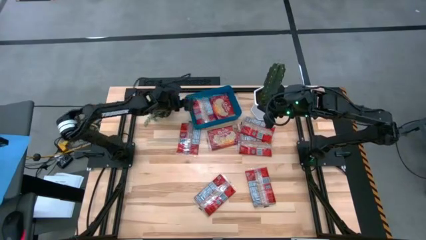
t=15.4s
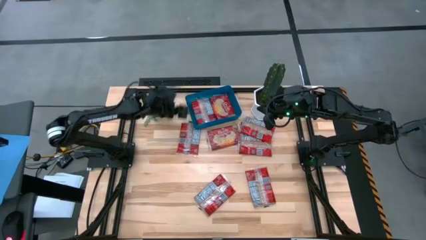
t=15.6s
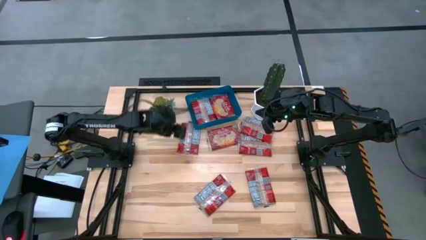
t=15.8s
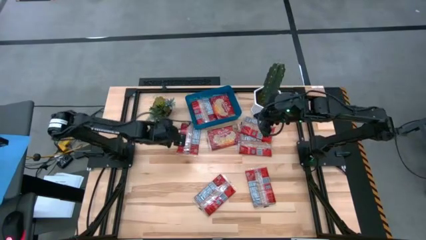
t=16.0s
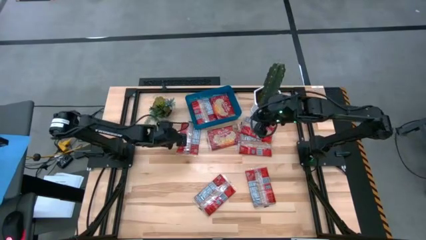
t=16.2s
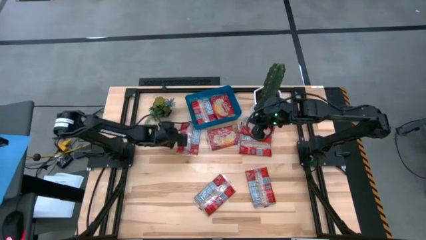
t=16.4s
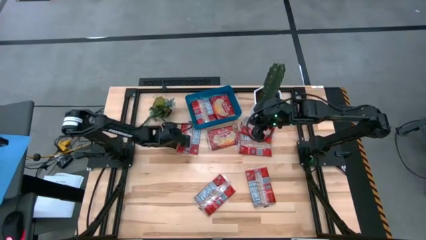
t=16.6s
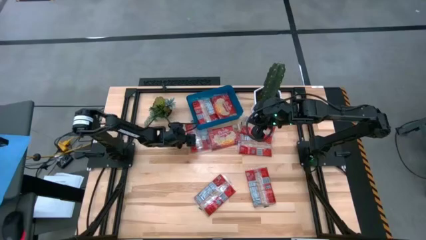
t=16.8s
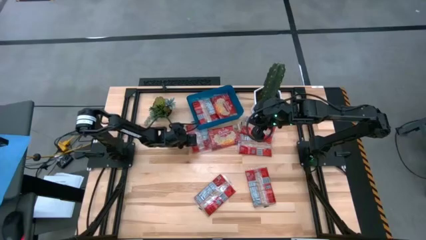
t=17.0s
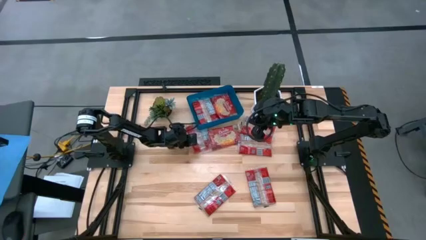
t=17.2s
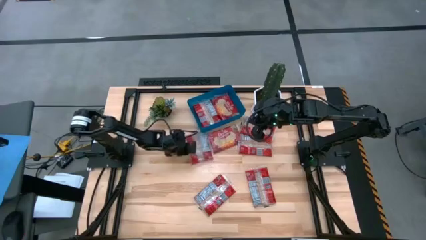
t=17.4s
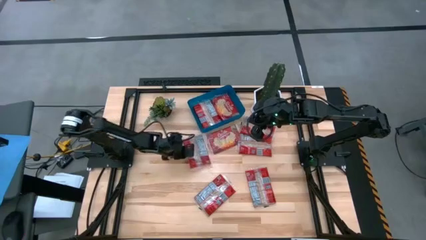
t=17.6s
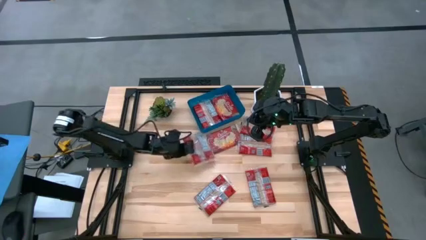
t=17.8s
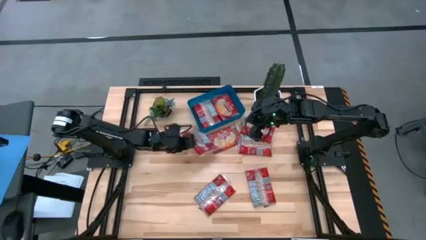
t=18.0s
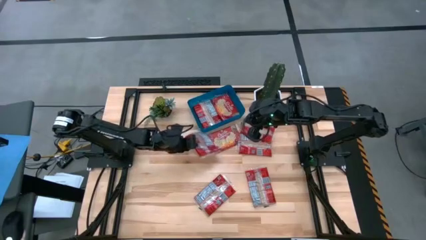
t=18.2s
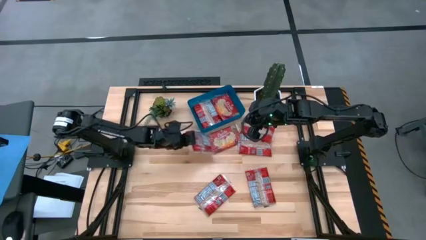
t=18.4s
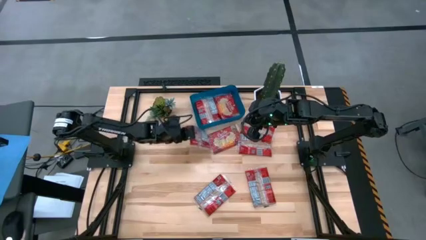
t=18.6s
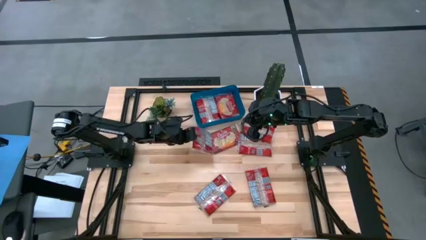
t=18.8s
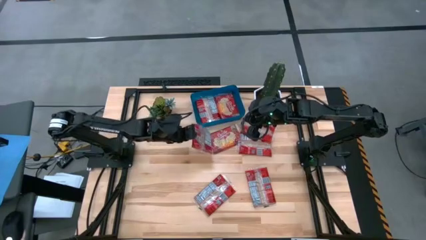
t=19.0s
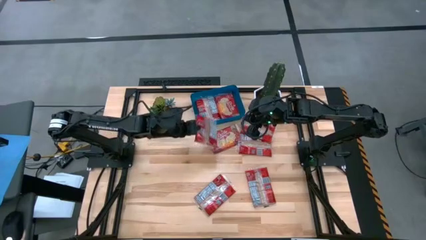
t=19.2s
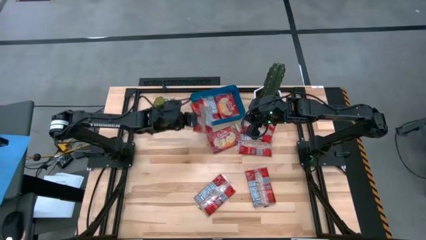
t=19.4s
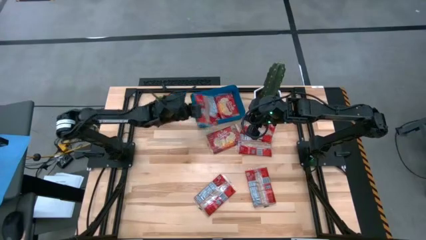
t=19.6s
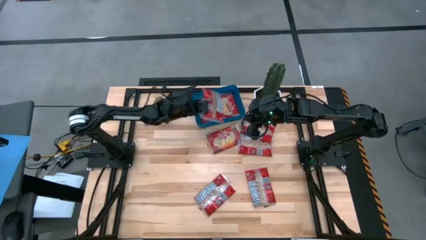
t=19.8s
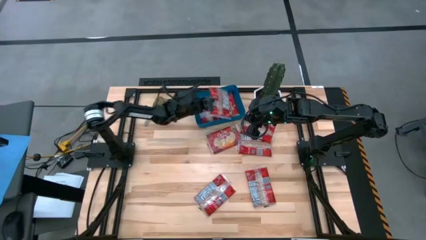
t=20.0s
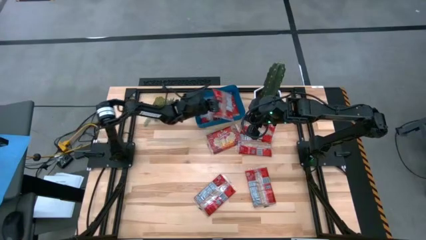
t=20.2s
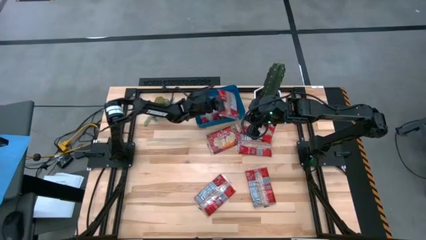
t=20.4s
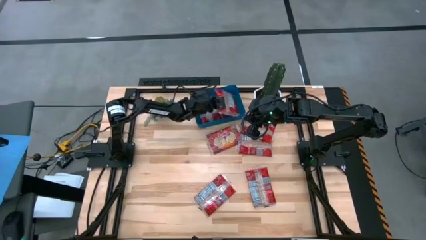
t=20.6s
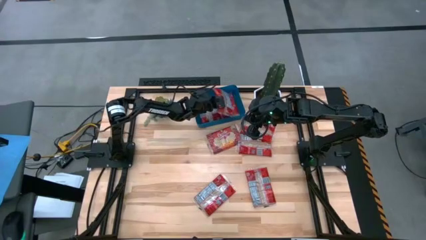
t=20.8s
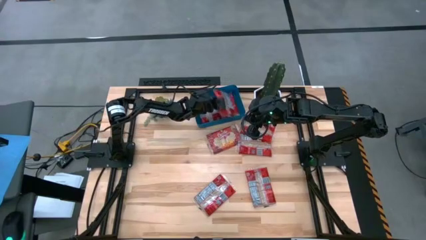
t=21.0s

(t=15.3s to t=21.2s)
Task: Sort popcorn bags into baskets
Put the popcorn bag into the blue bin

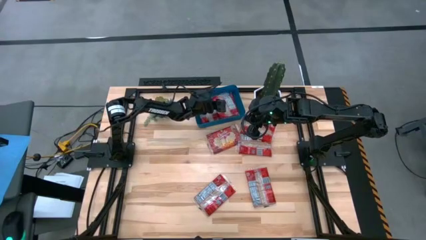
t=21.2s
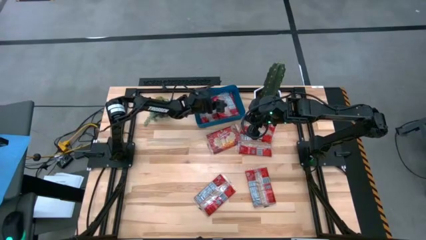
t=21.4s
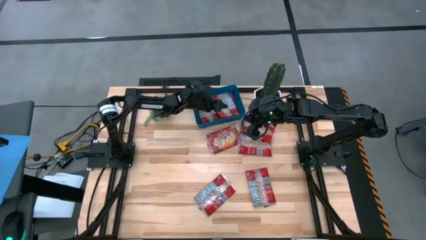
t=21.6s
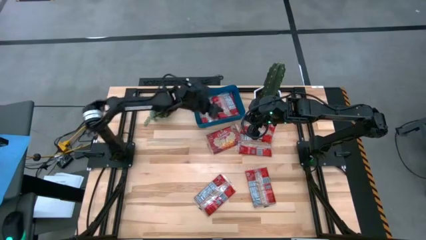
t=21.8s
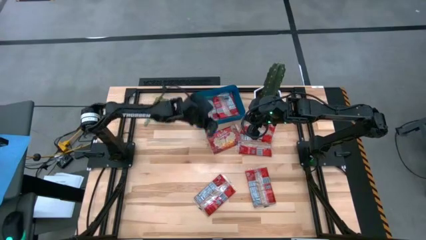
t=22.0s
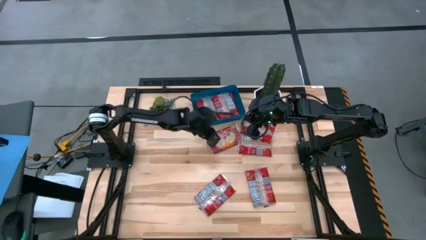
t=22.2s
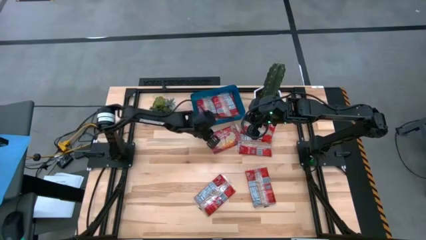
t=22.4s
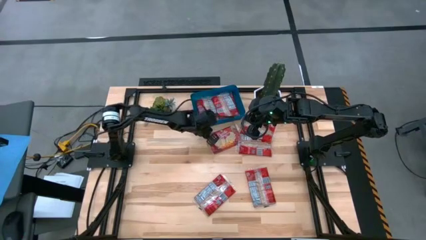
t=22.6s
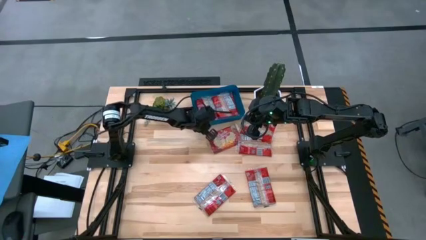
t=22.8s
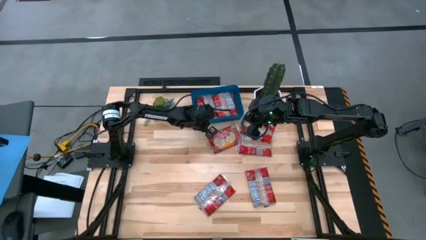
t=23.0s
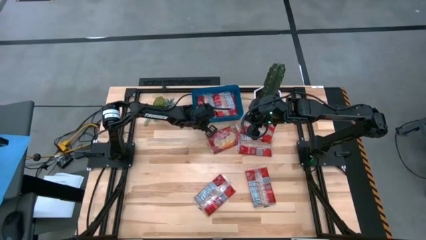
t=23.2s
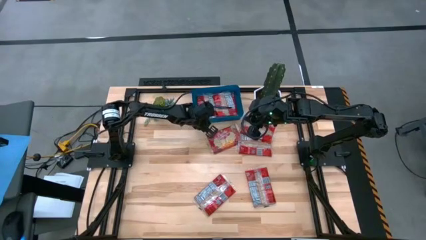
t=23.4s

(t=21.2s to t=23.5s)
Adjust the blue bin

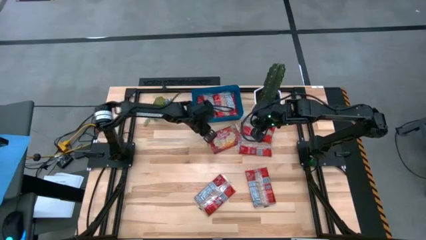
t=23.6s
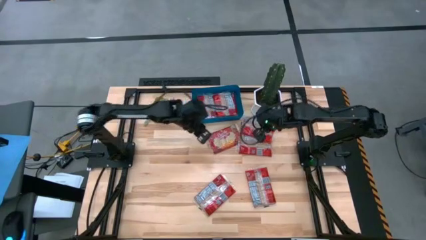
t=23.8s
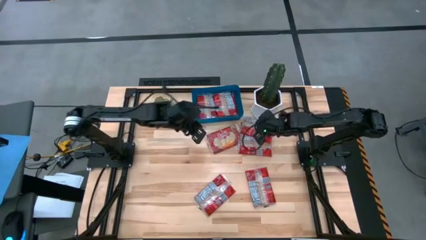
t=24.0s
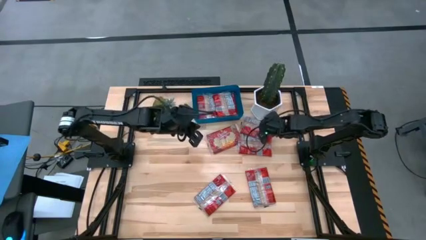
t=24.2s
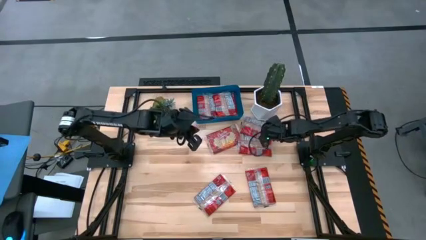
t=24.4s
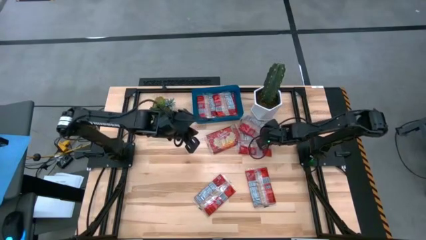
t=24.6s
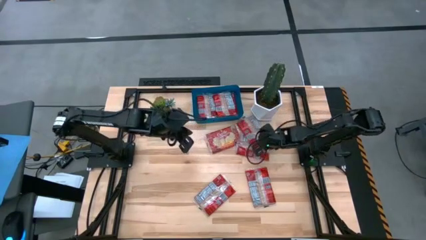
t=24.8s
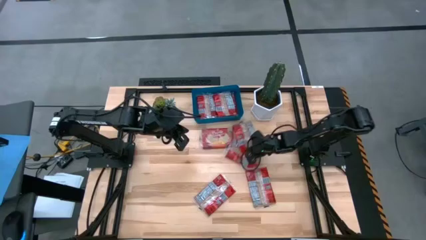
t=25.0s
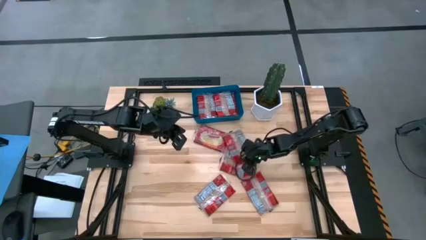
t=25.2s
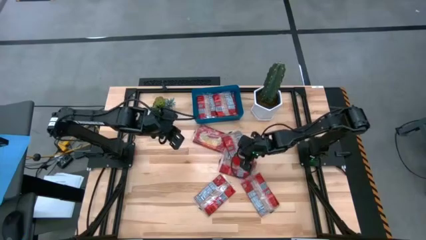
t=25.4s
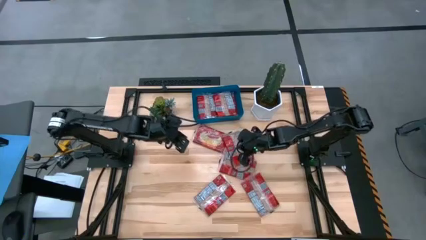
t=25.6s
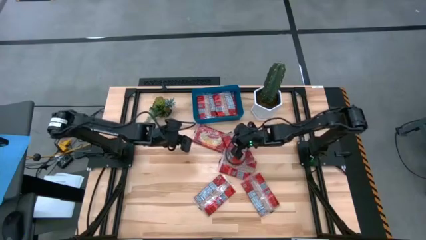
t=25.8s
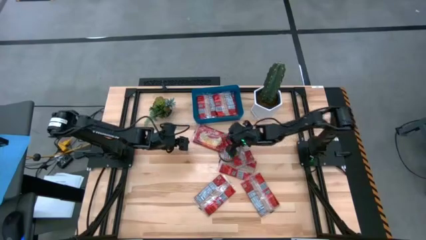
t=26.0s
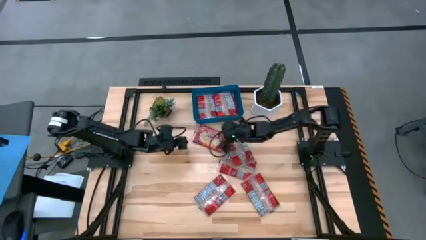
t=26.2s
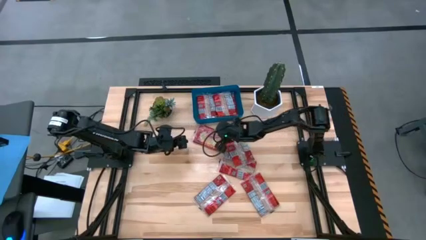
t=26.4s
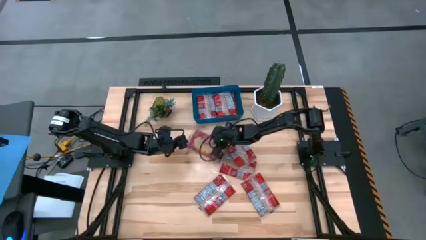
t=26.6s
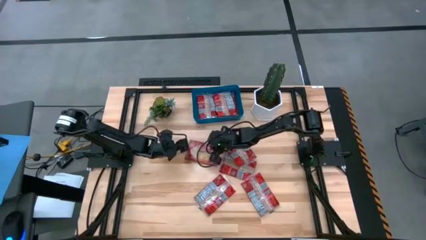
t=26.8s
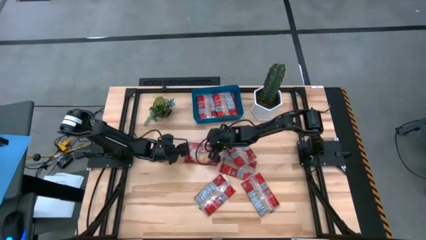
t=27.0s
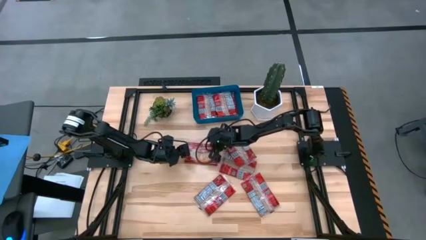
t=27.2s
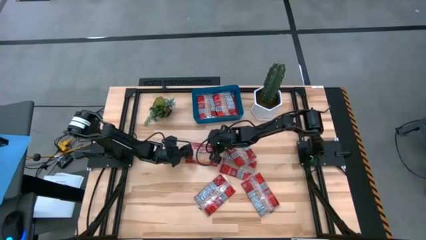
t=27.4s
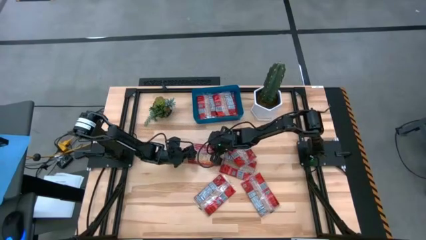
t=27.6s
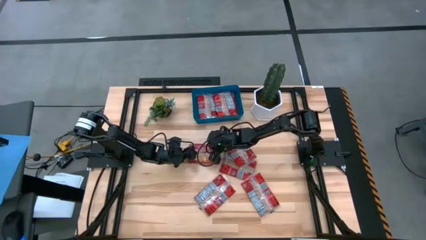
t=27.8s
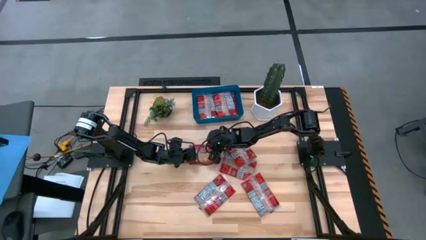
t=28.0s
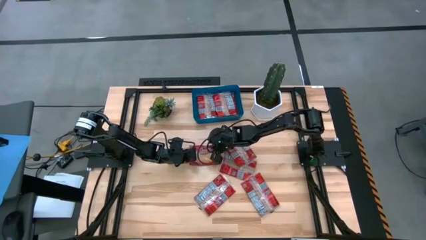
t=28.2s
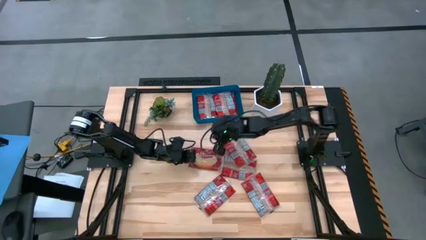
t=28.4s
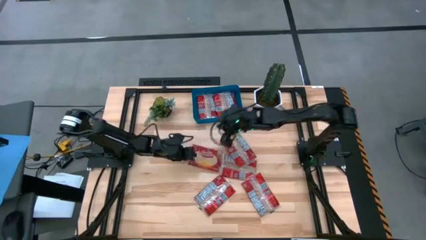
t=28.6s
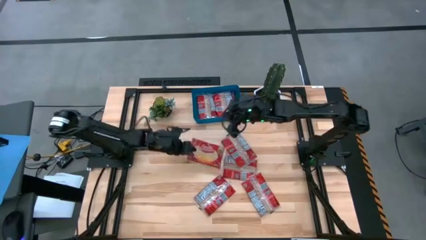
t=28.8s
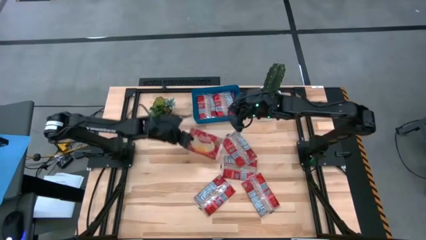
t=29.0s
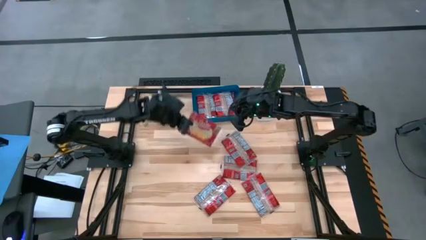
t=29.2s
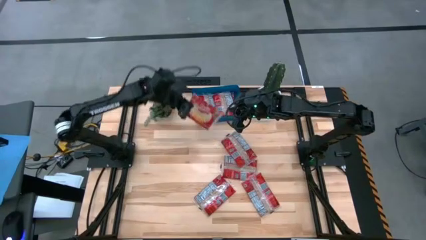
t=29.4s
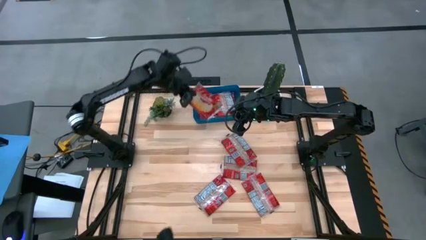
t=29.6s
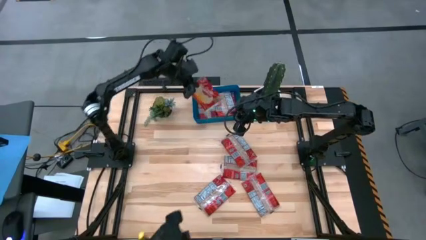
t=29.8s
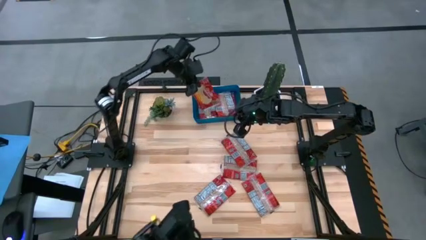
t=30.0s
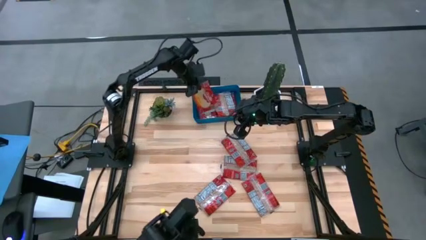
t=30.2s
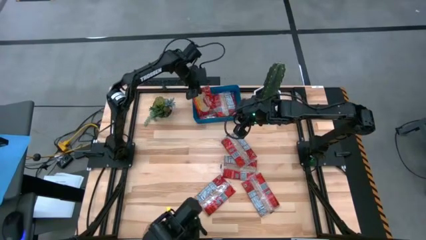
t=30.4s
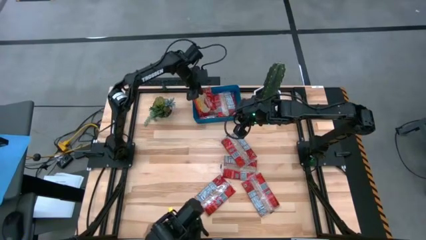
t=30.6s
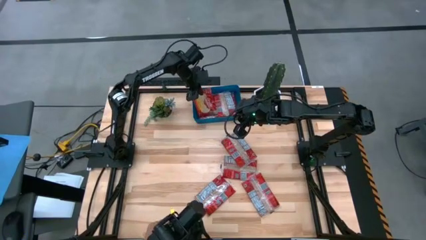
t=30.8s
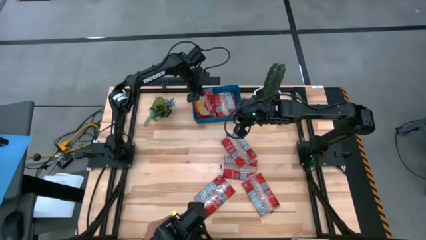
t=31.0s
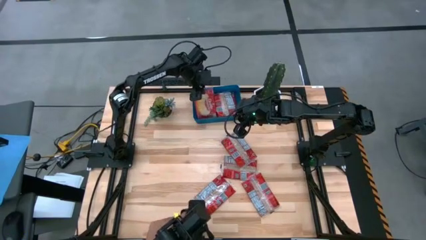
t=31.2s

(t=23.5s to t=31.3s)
Put the popcorn bag into the blue bin
